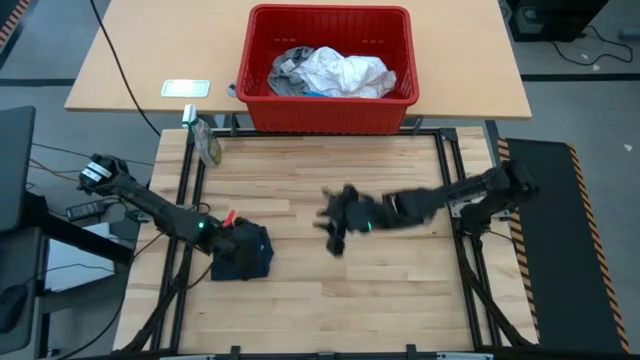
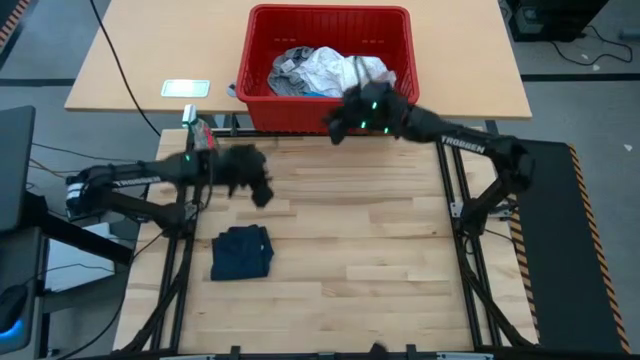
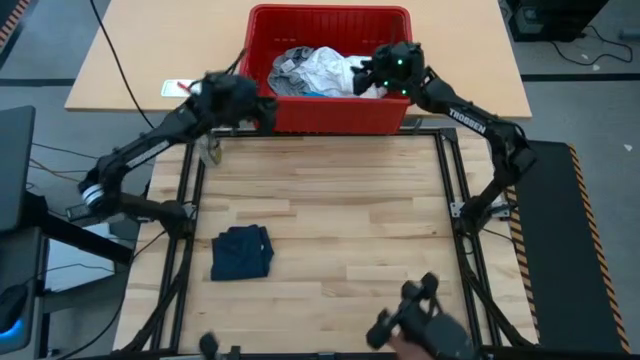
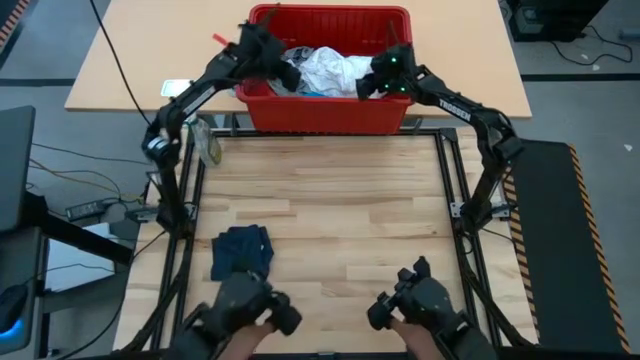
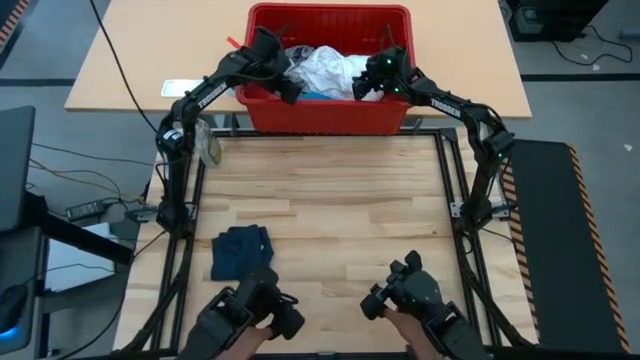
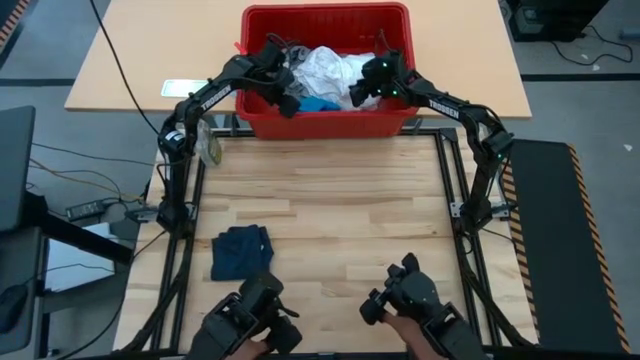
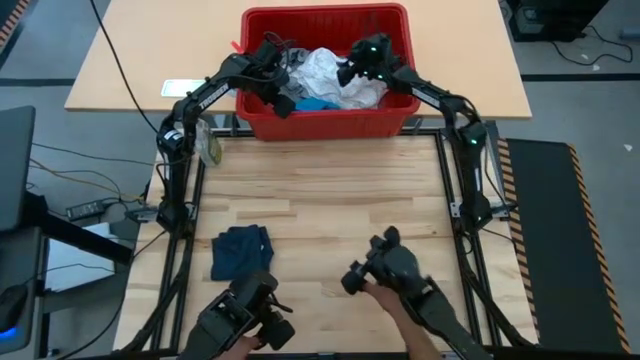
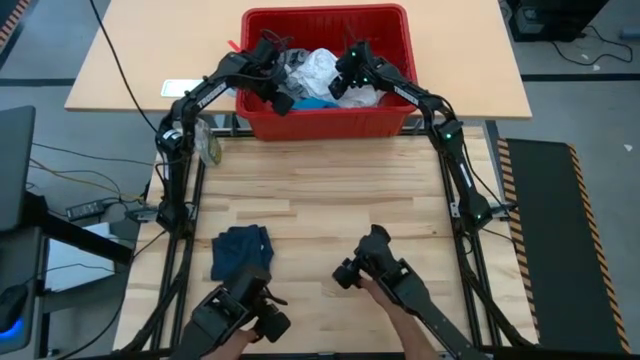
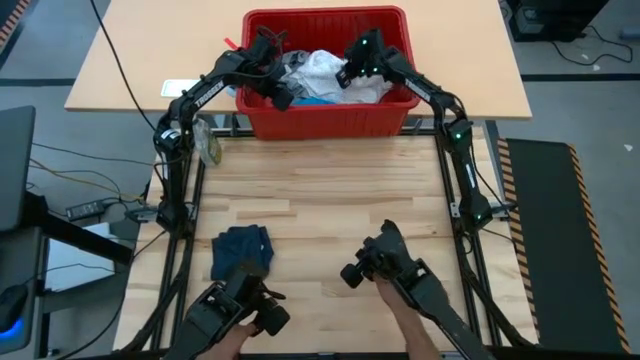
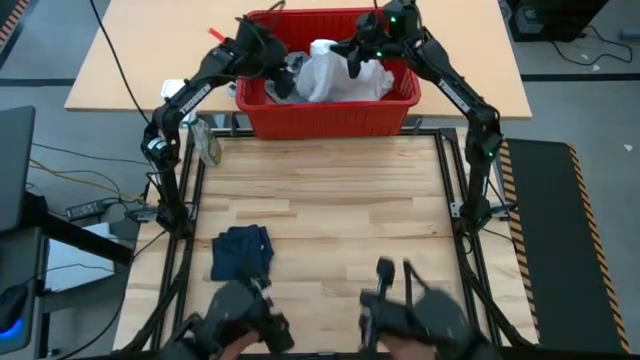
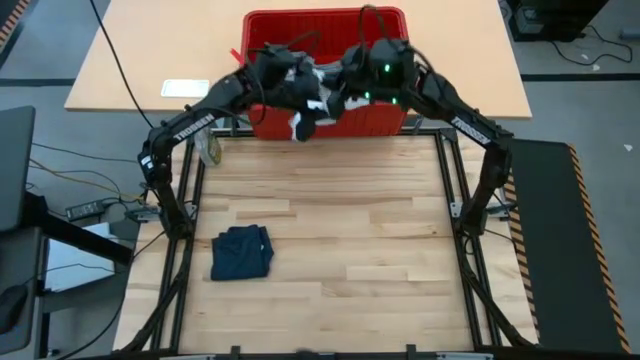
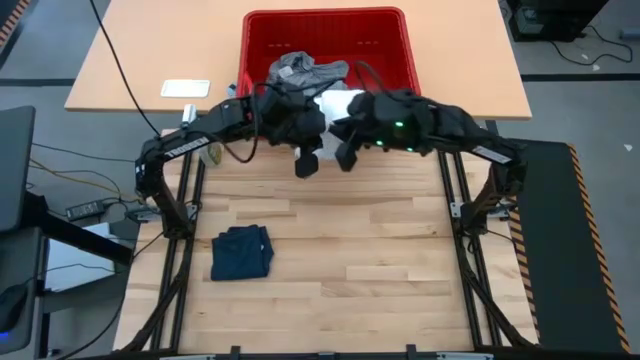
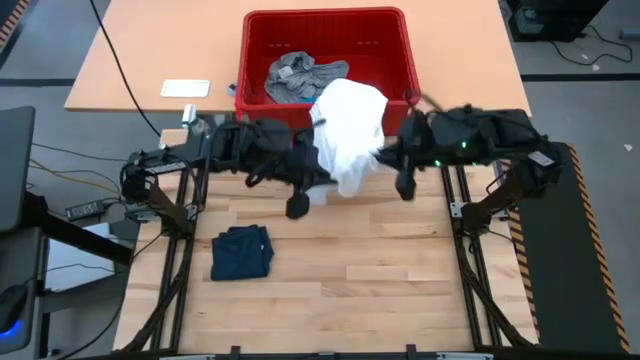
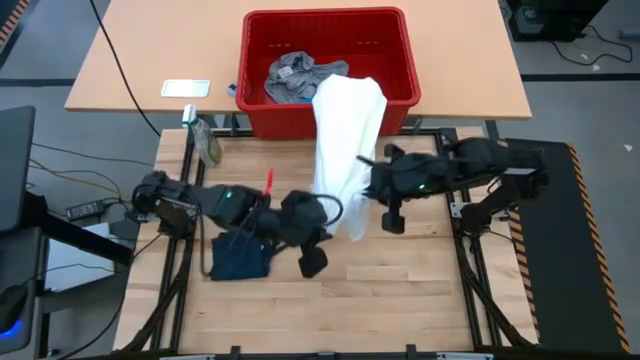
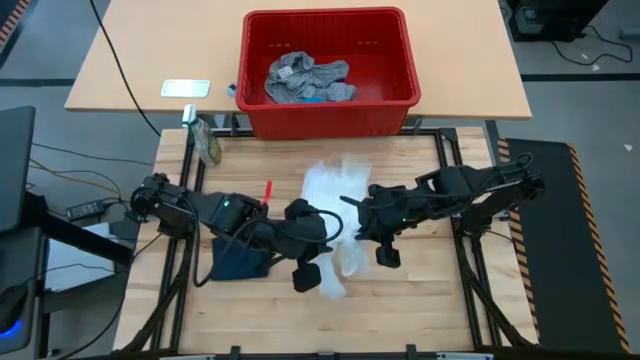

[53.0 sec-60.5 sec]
Task: Fold laundry
Remove the white dress from the red laundry bin

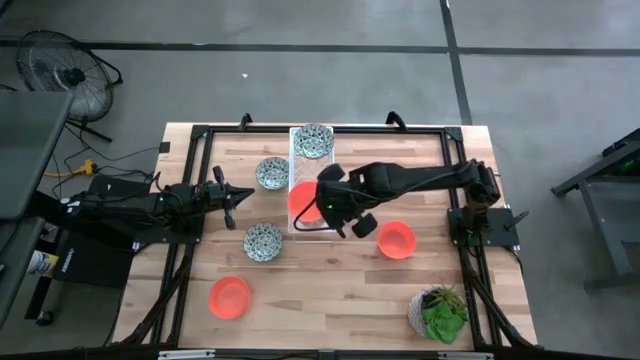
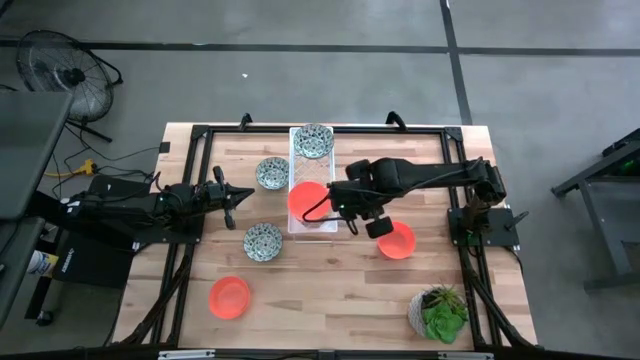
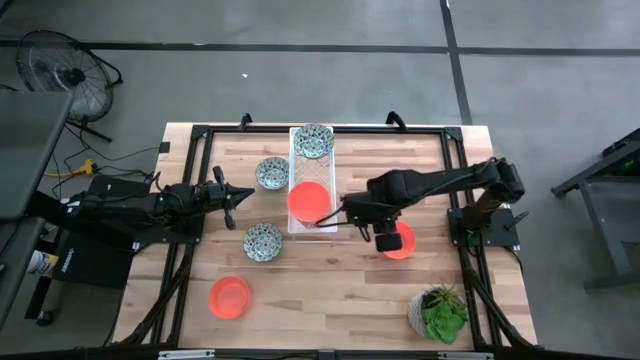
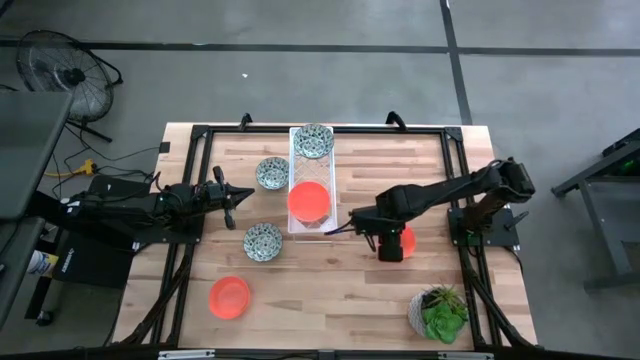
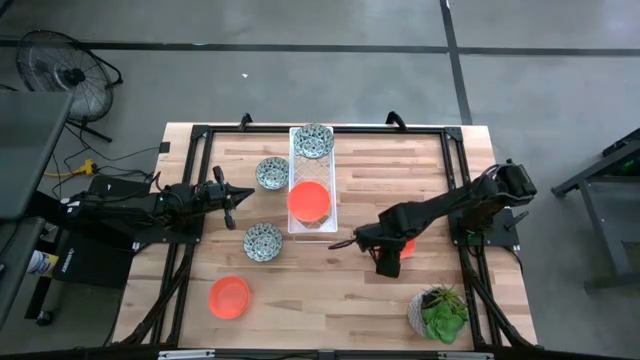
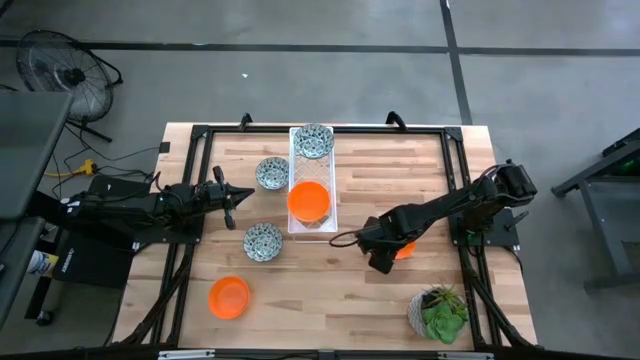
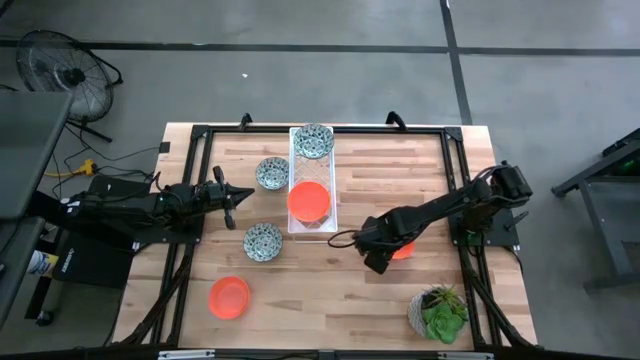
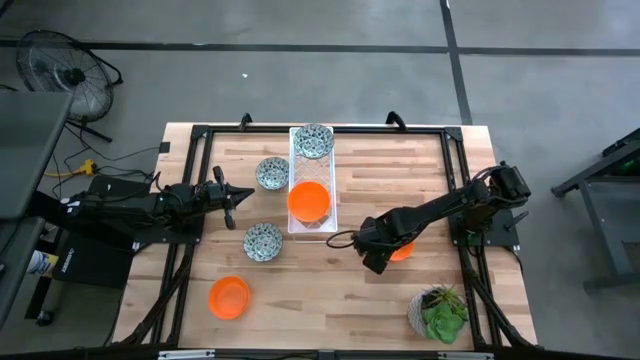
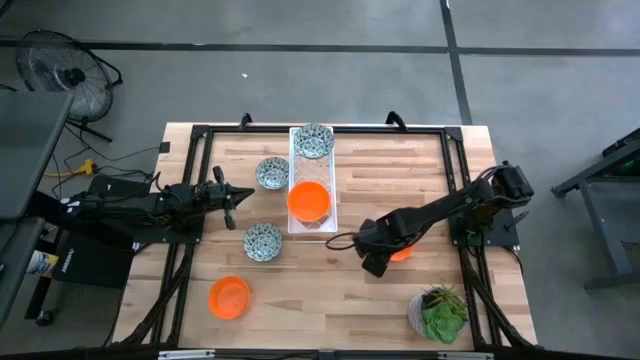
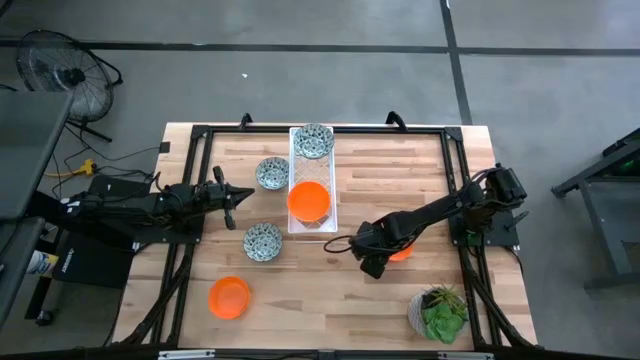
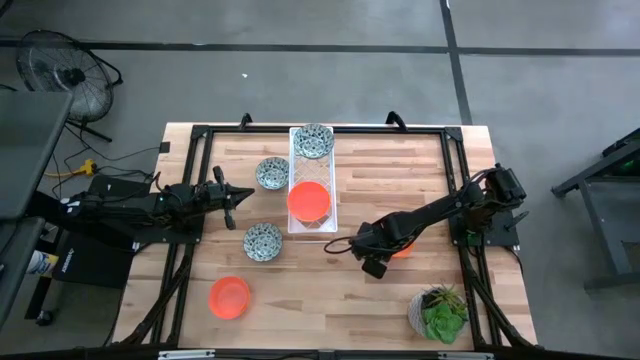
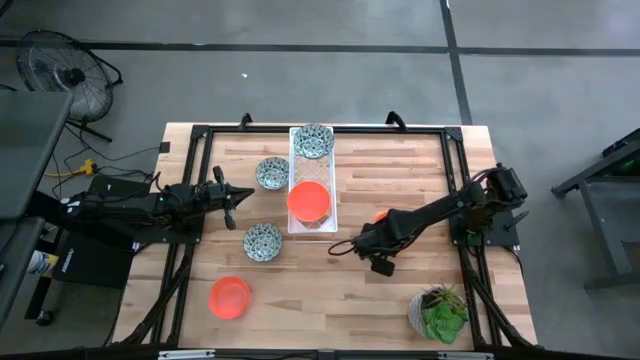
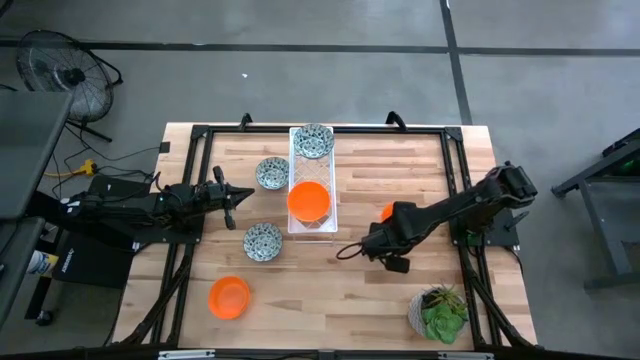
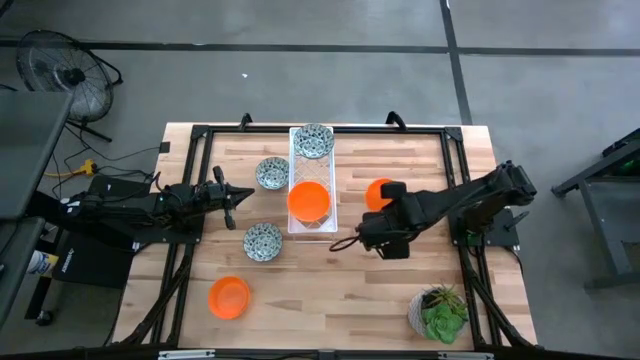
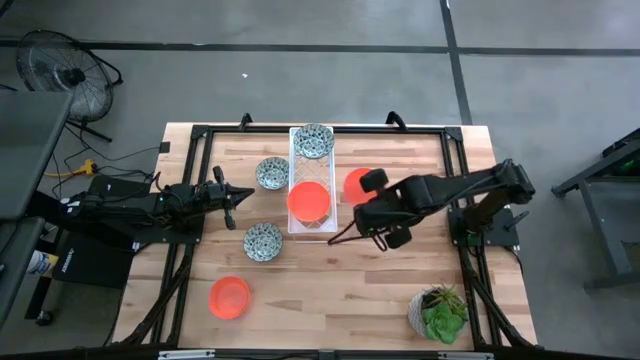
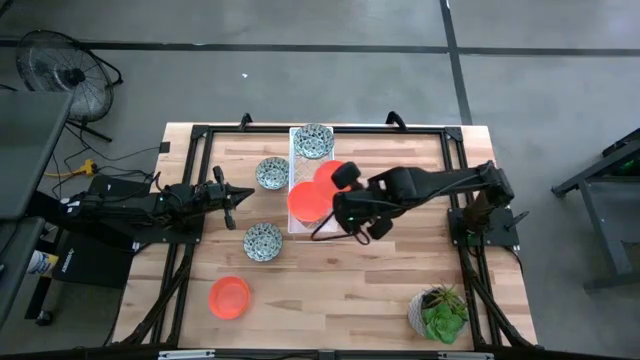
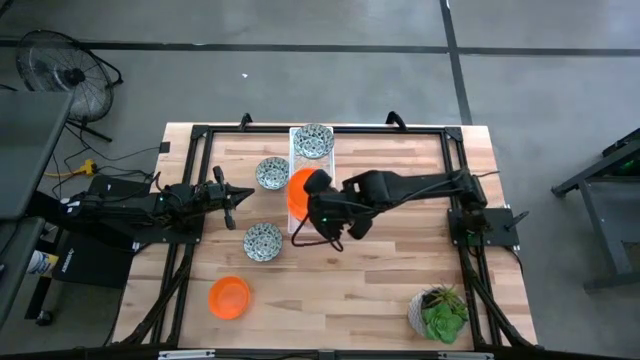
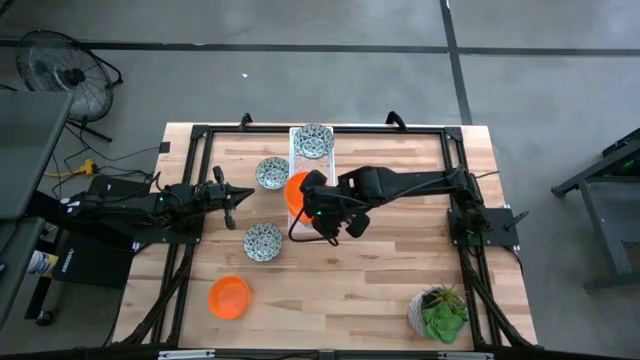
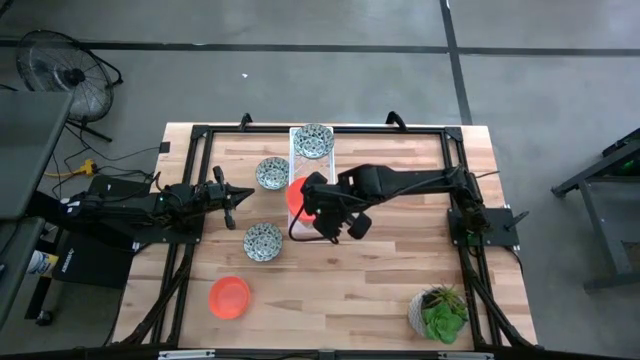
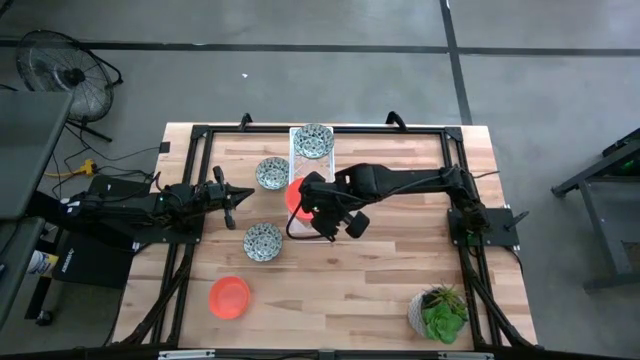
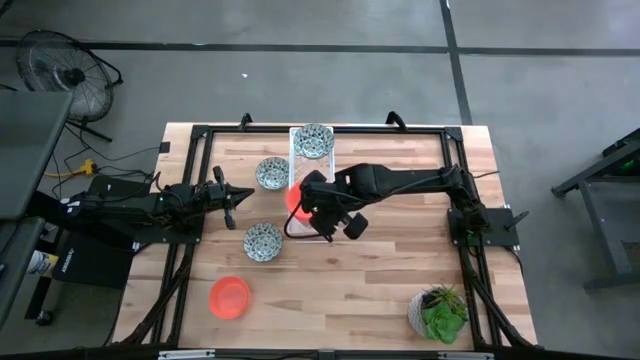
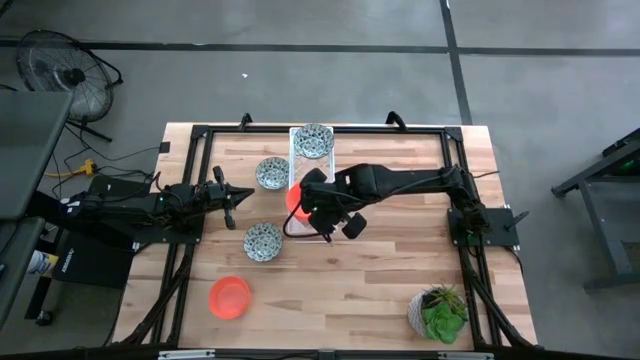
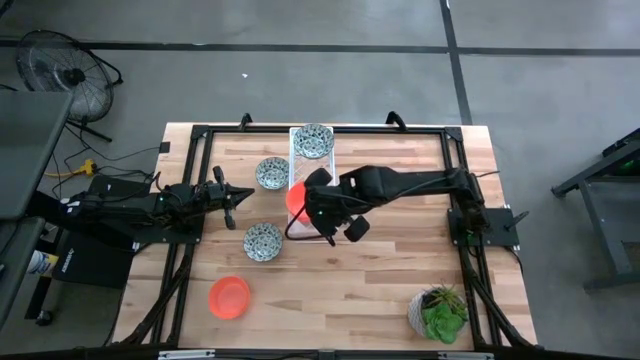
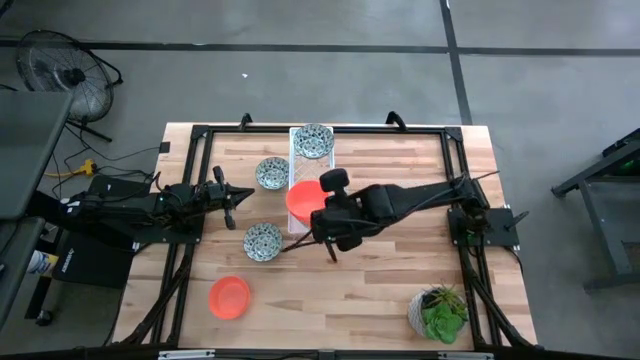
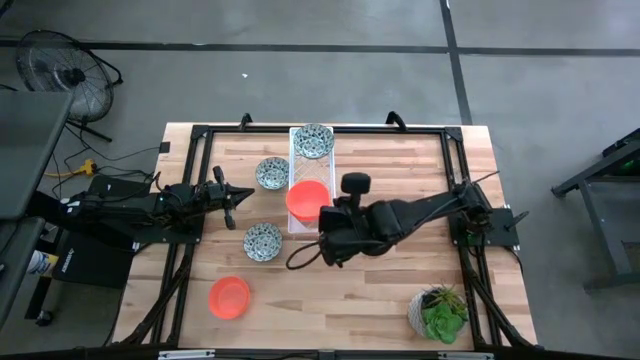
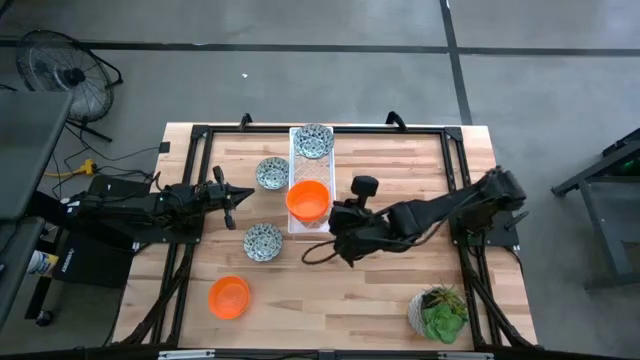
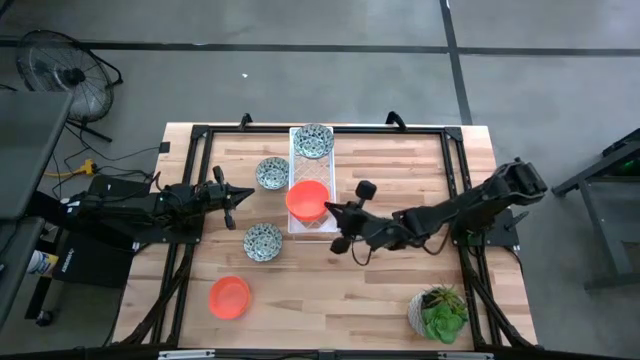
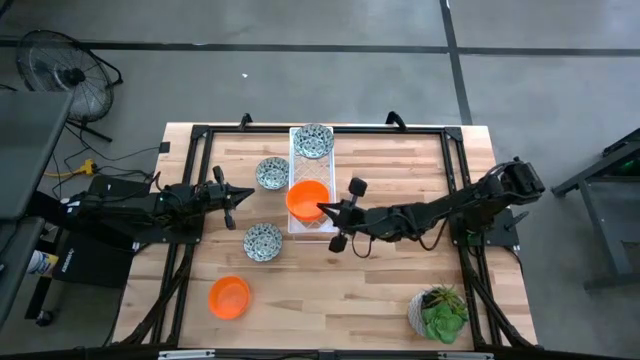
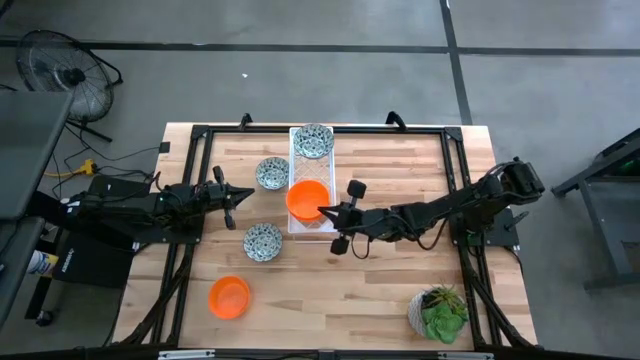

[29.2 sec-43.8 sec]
Task: Pick & Place Mini bowls
Stack the top orange bowl on the orange bowl on the shelf
